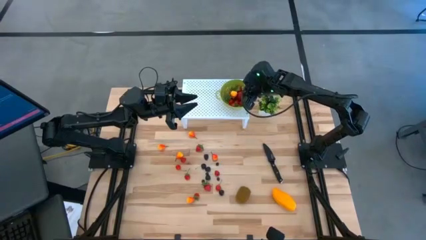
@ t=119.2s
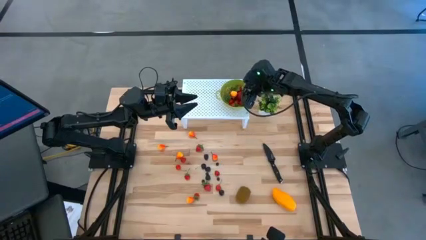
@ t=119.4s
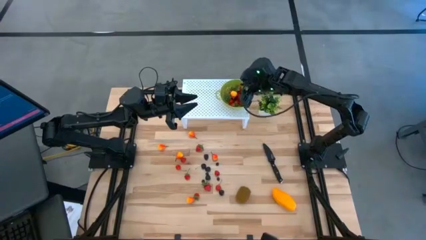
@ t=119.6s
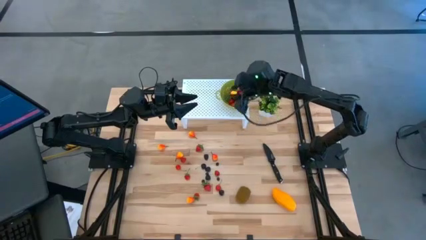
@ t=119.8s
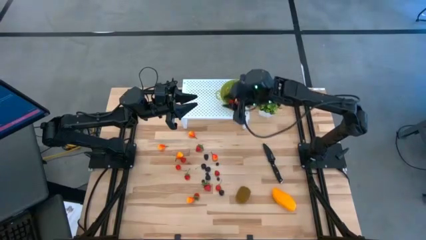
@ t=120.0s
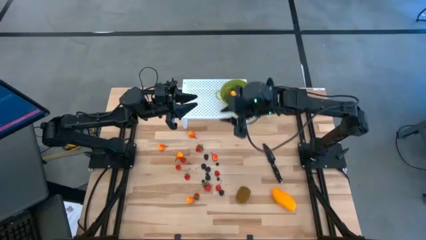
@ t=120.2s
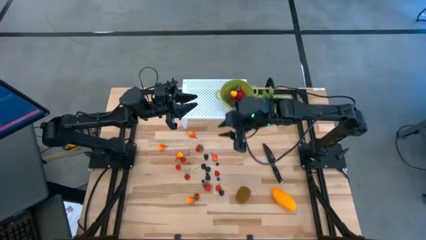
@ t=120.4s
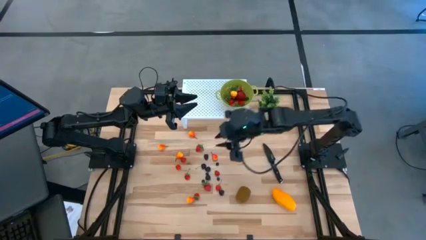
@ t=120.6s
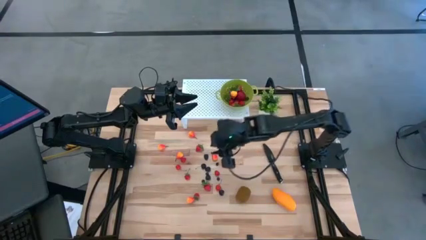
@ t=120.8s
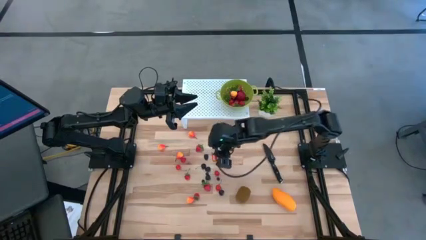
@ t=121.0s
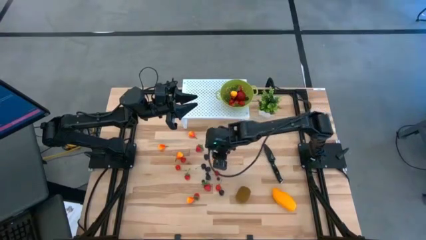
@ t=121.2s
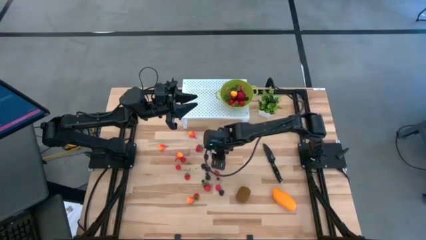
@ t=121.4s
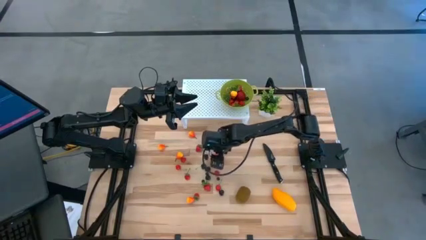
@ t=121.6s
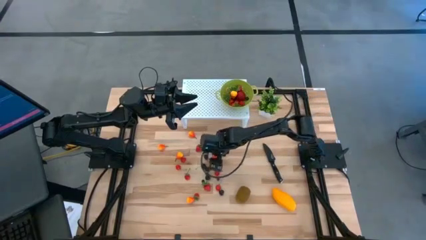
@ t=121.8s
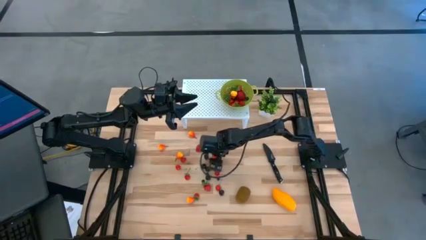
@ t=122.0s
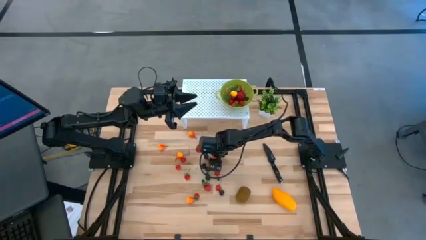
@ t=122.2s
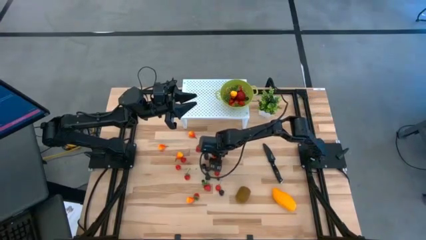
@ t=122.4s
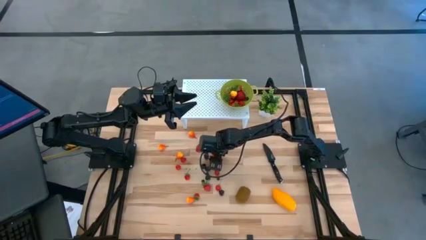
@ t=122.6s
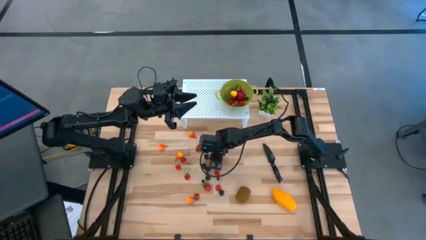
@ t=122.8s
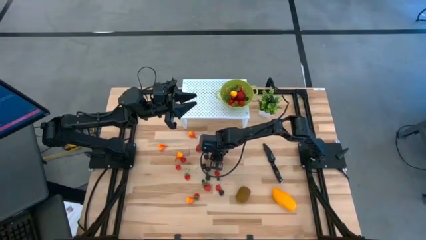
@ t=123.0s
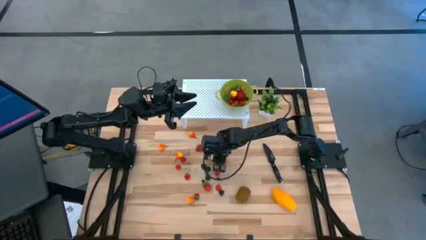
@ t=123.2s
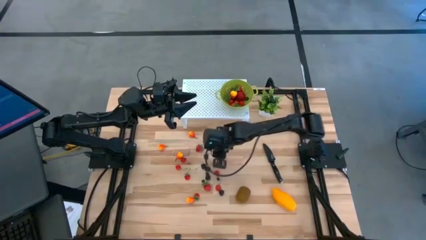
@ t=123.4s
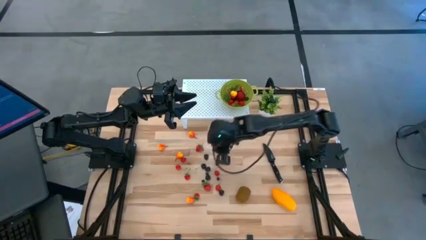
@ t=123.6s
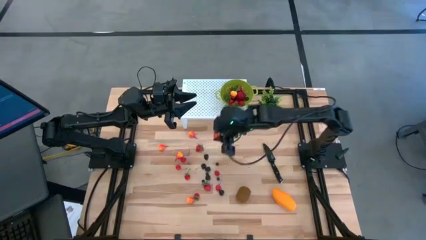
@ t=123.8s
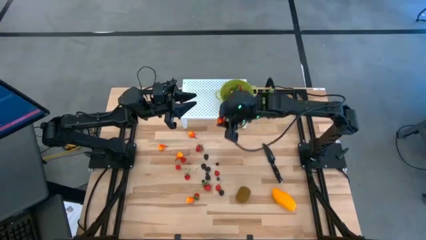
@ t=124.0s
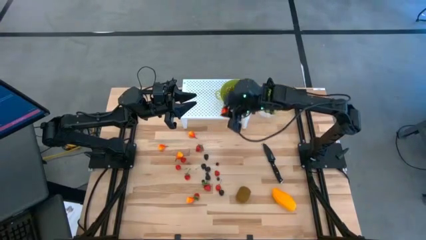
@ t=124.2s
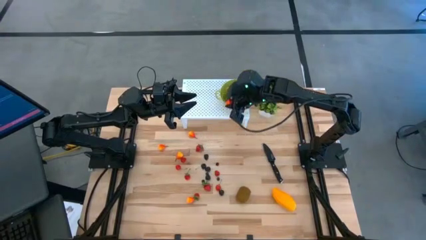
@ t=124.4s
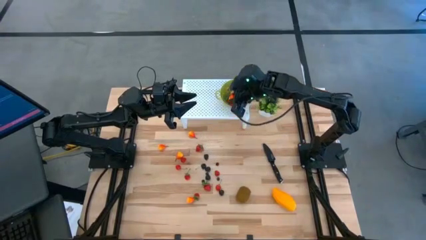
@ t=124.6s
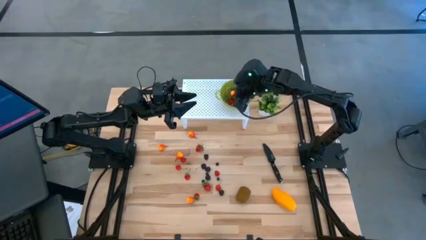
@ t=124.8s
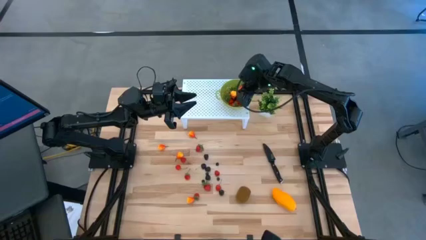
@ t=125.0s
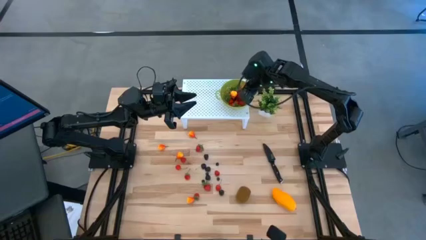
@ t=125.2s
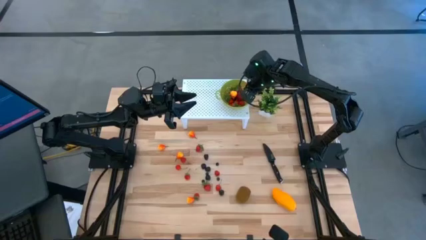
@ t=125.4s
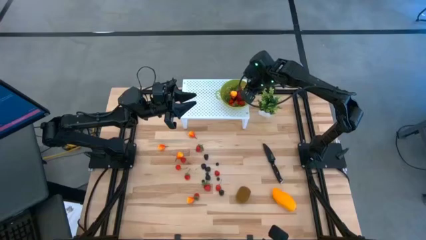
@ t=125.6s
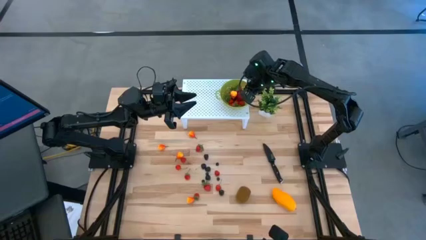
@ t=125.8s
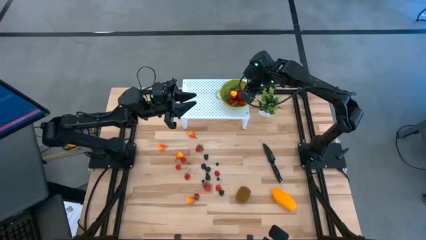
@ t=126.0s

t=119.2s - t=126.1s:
Task: Pick & Place Fruit
Put the orange pear into the green strainer bowl

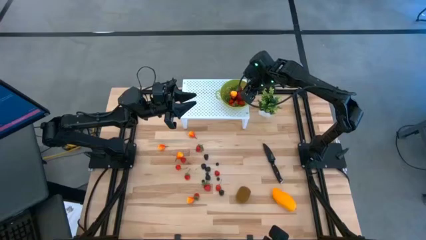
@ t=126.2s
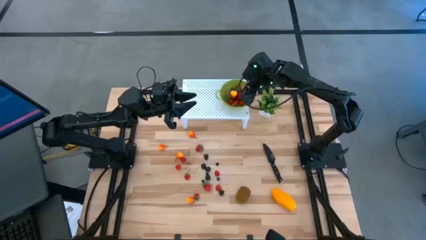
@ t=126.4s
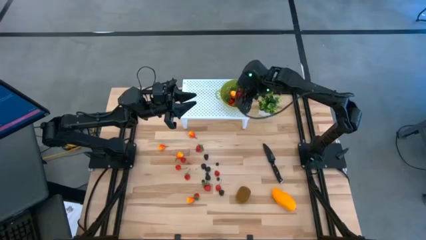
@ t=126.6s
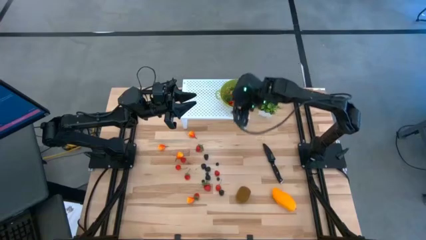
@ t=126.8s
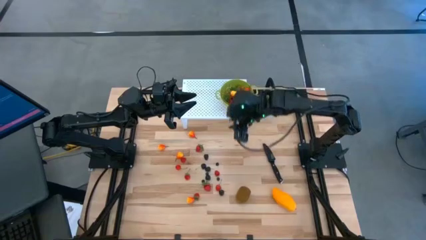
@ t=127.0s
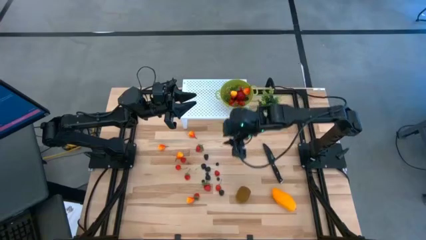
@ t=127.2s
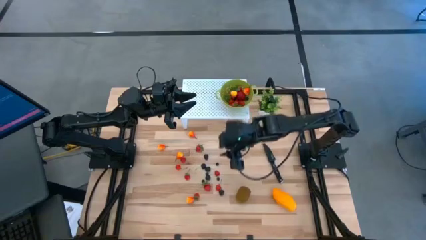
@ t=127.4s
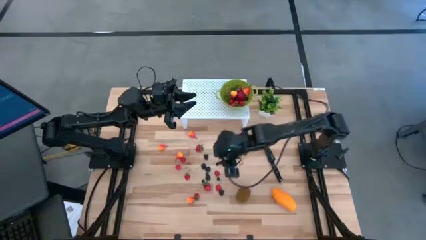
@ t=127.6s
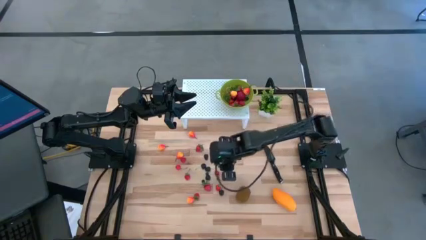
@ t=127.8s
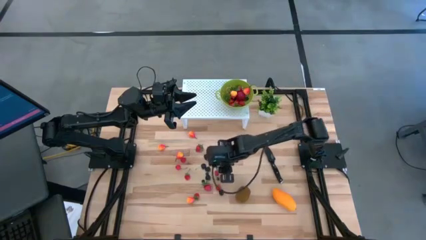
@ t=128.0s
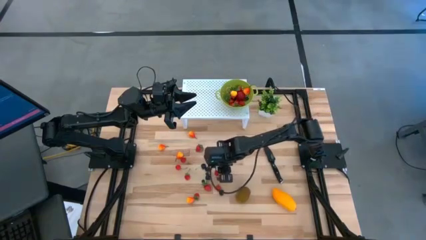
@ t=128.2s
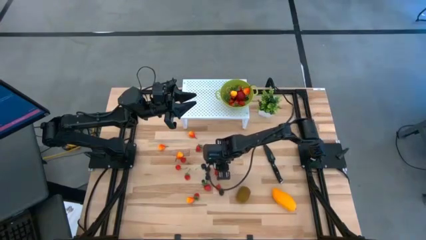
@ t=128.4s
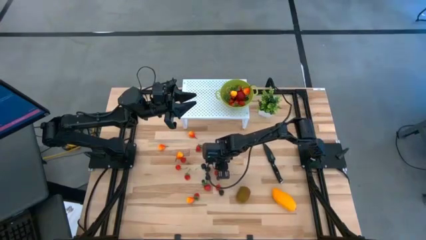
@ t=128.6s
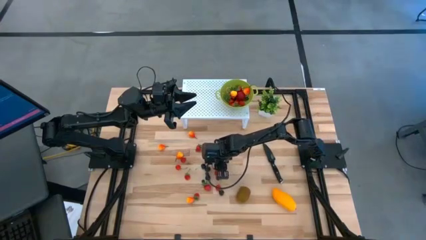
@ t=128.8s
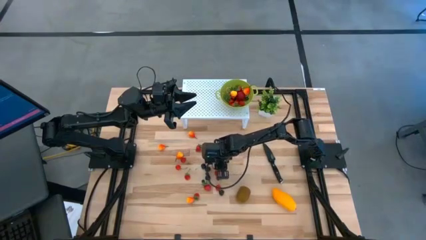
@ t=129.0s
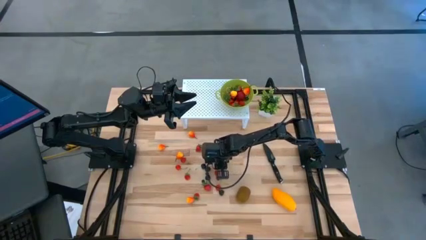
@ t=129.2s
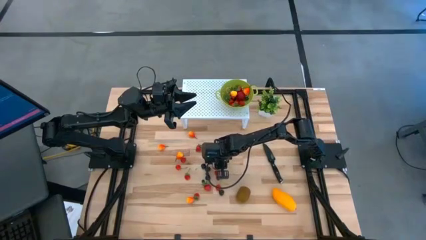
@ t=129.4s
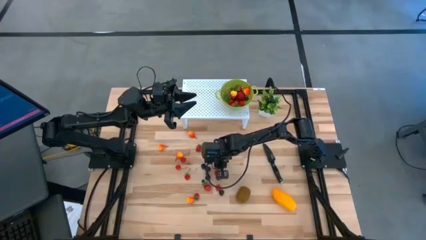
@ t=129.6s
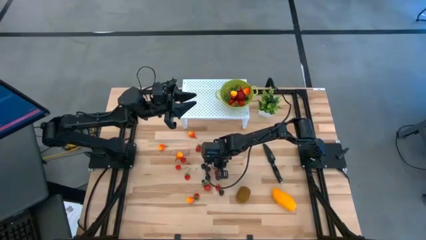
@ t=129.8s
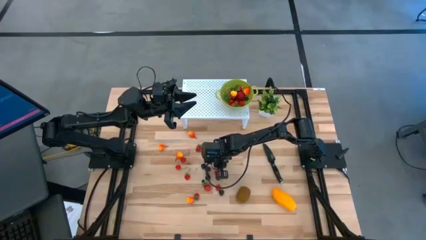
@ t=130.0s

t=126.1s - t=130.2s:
Put the black blueberry into the green strainer bowl

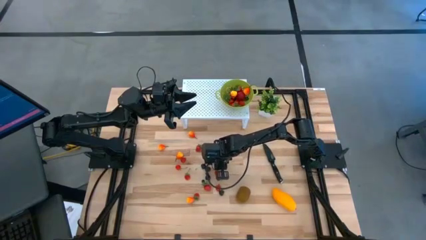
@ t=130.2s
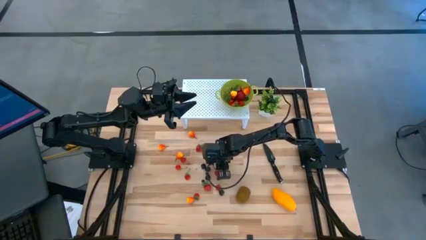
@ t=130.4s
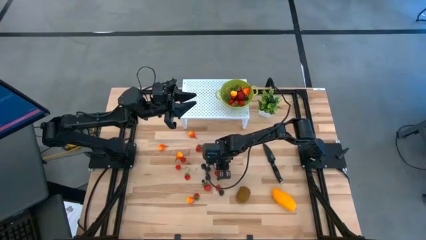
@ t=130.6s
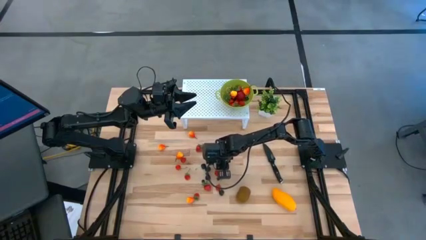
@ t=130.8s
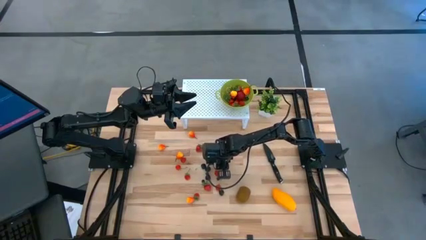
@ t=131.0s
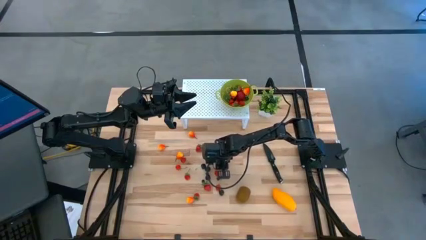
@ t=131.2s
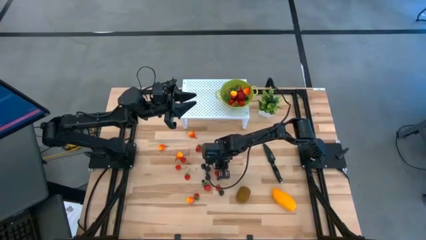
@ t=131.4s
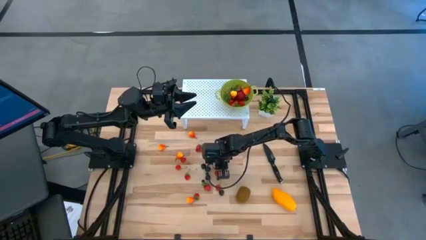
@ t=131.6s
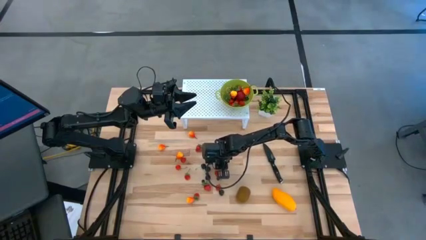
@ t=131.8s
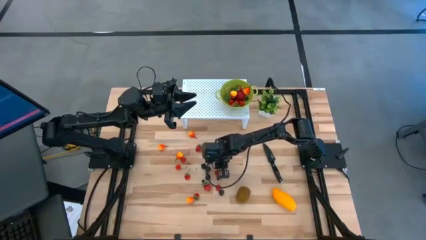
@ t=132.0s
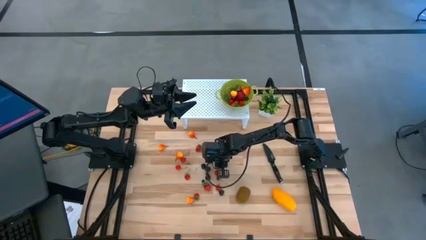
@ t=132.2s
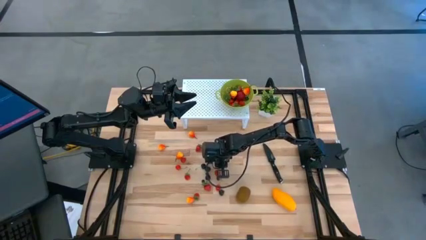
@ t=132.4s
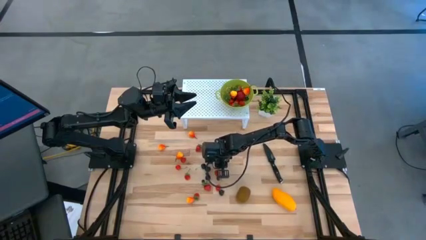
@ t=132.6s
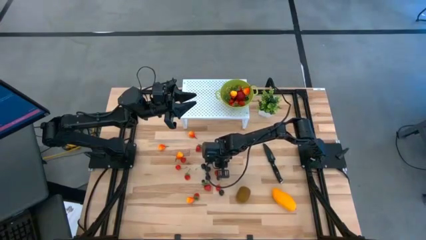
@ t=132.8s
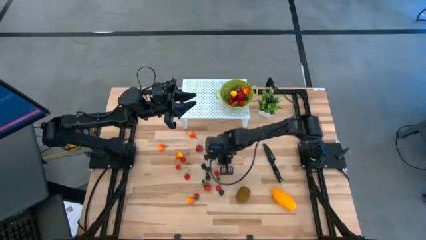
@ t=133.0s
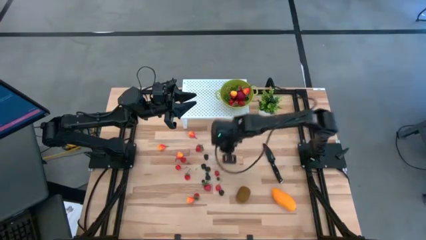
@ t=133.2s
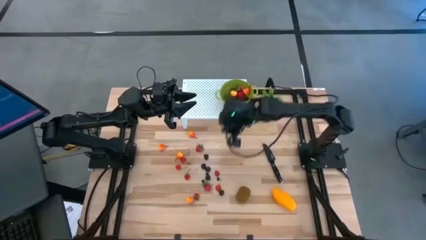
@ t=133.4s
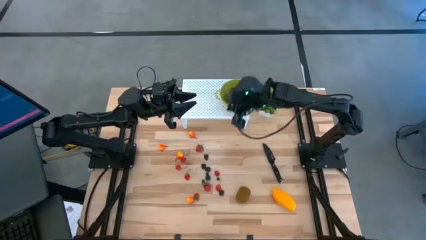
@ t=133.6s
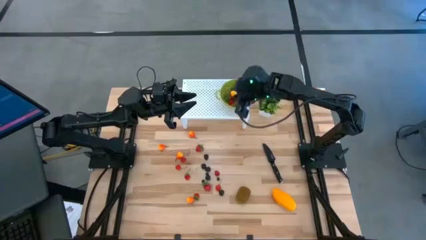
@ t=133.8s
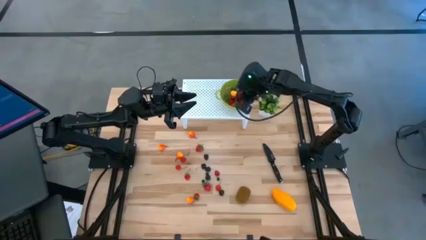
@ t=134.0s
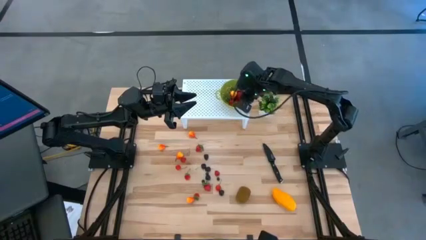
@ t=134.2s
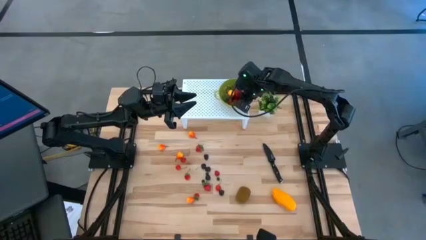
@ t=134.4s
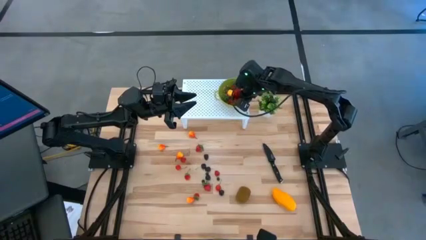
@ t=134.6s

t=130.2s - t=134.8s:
Put the black blueberry into the green strainer bowl
